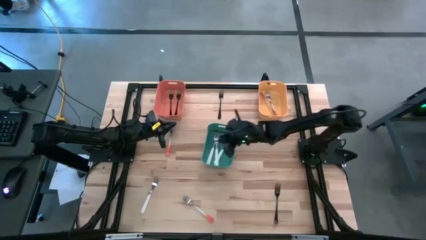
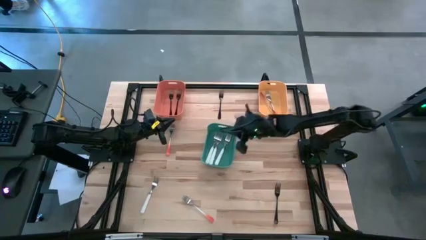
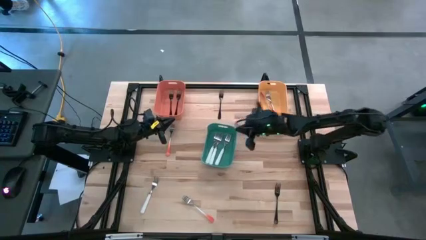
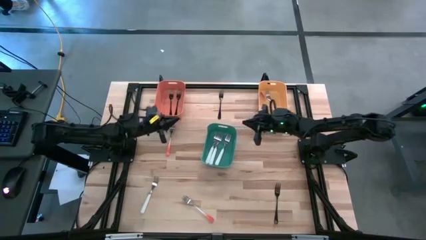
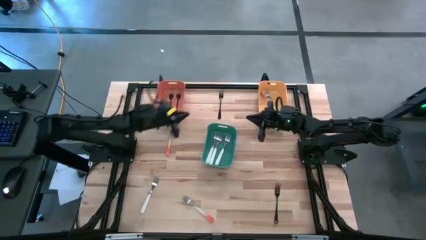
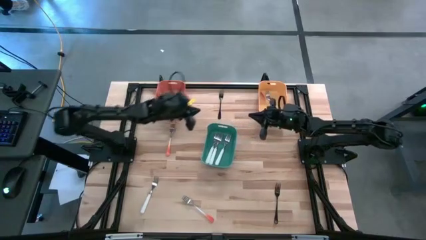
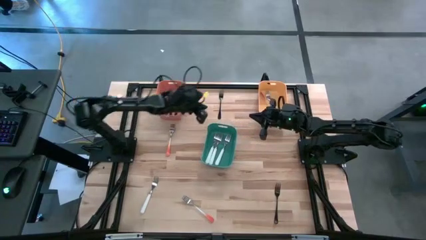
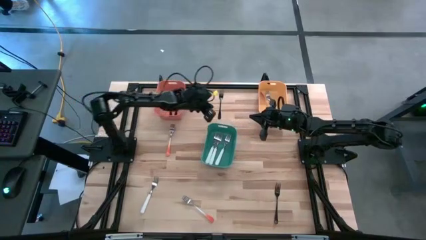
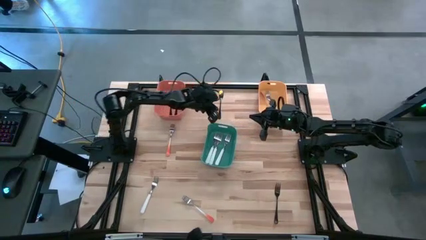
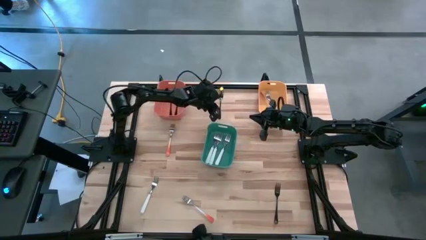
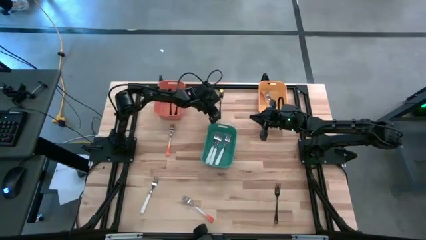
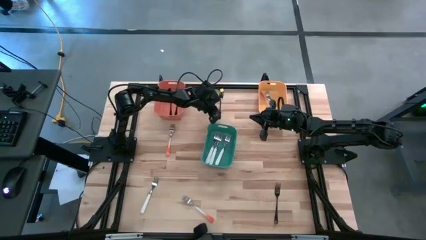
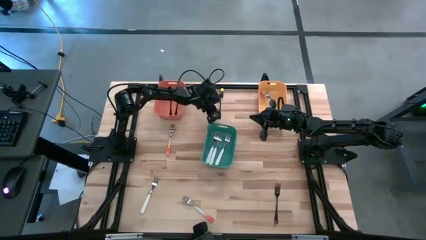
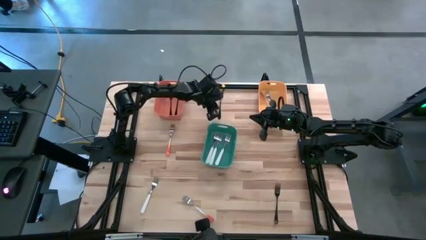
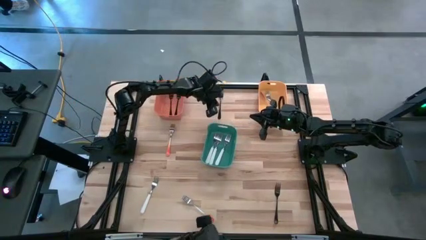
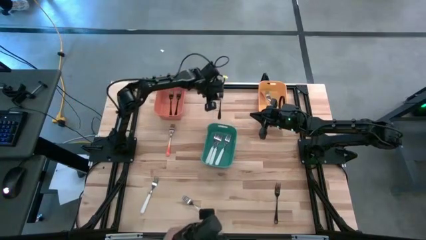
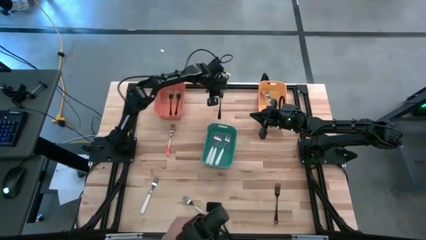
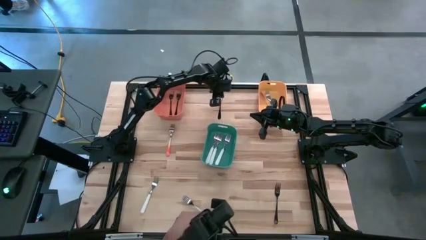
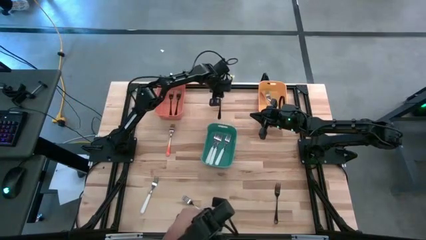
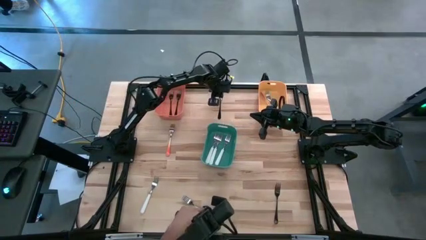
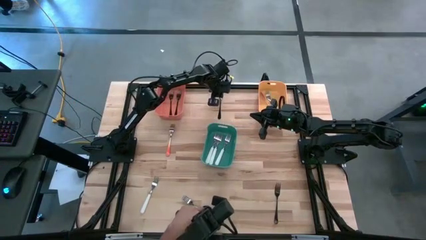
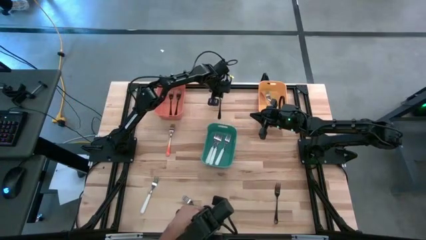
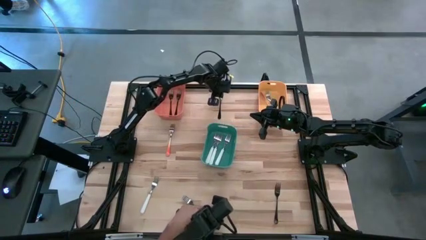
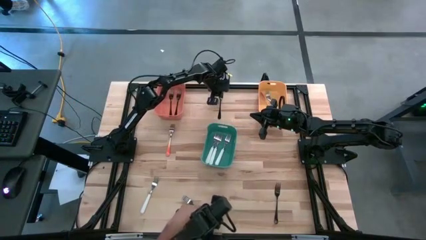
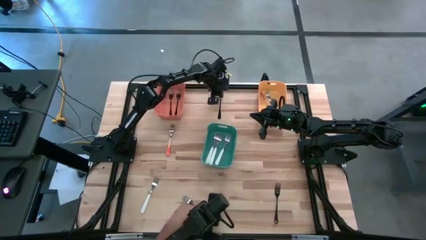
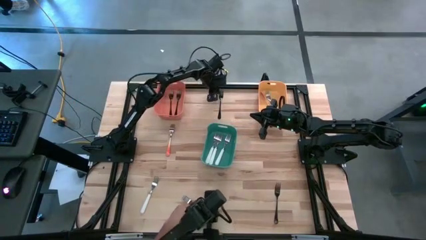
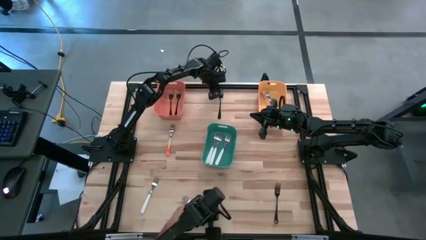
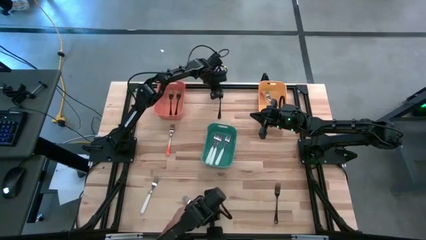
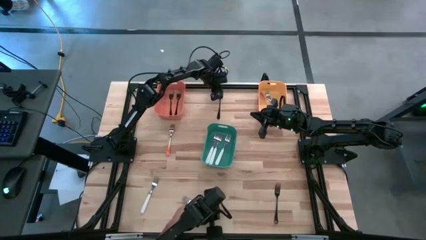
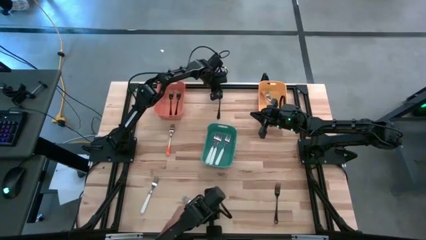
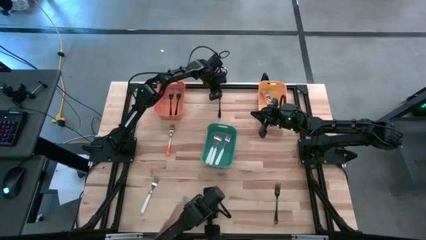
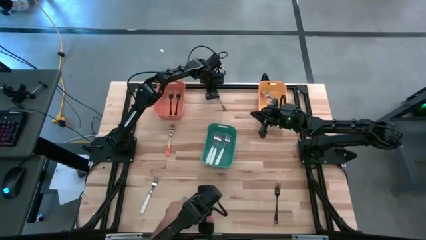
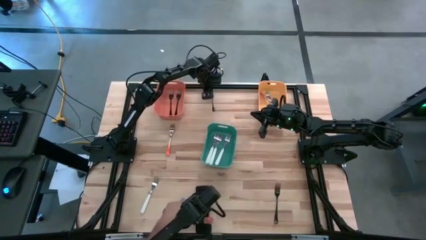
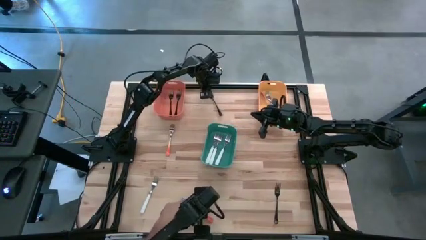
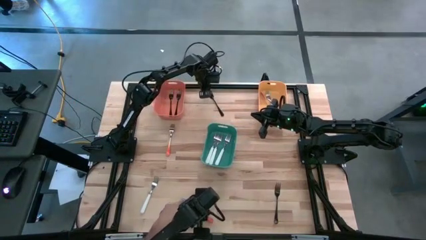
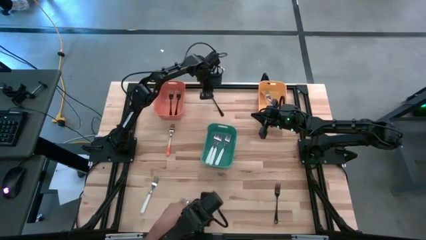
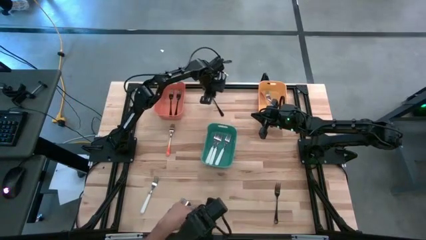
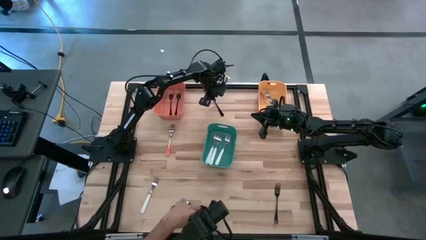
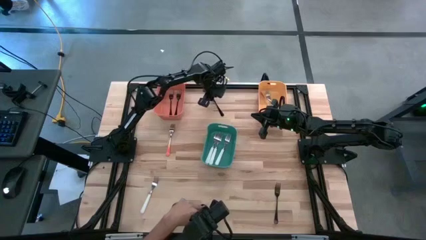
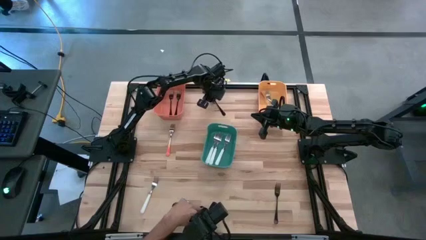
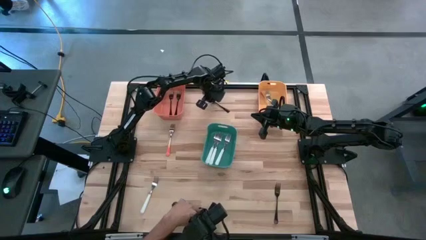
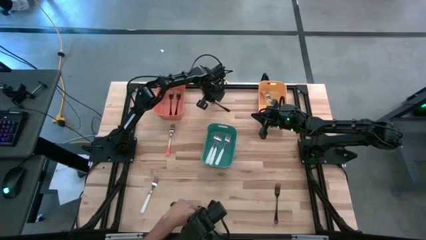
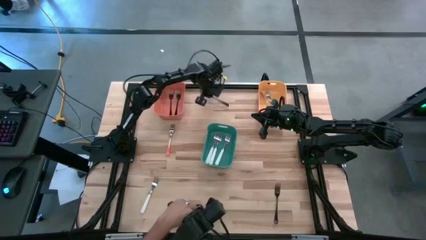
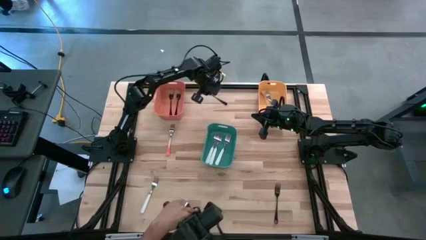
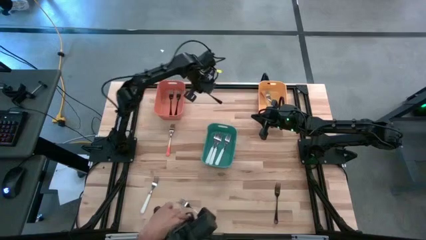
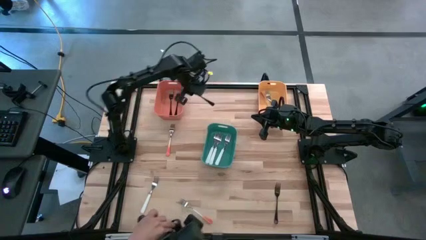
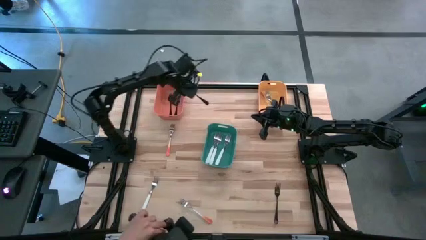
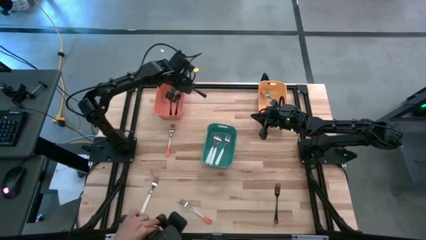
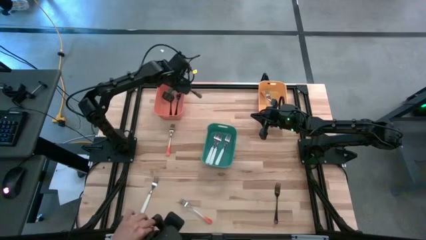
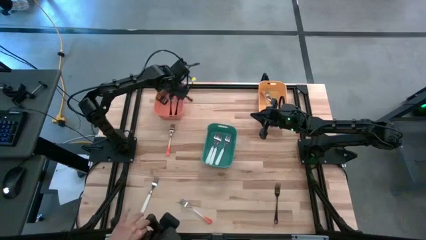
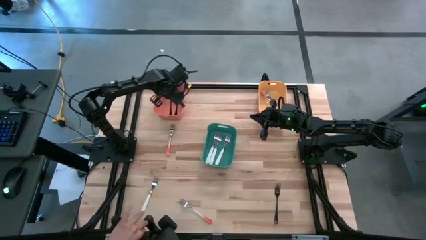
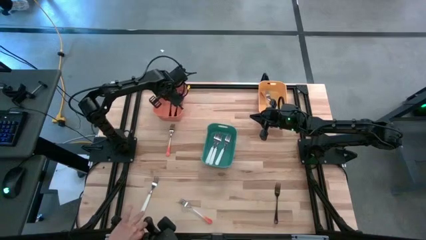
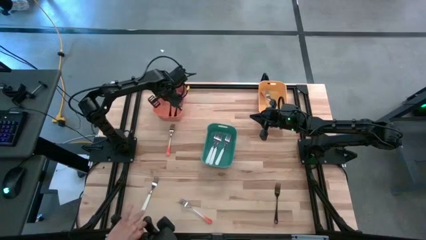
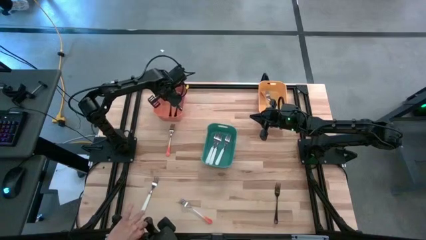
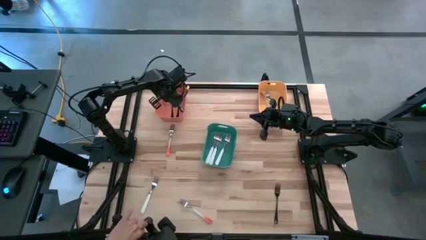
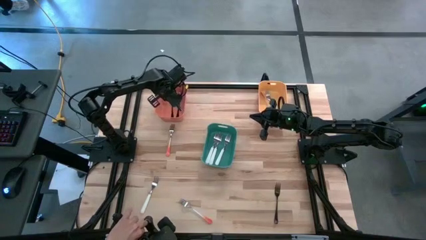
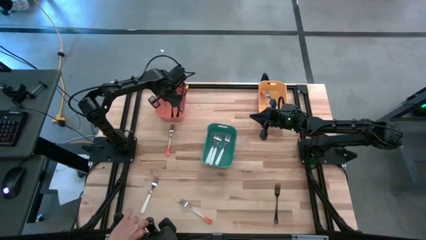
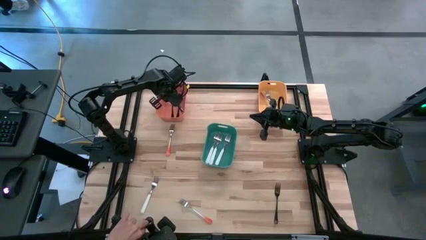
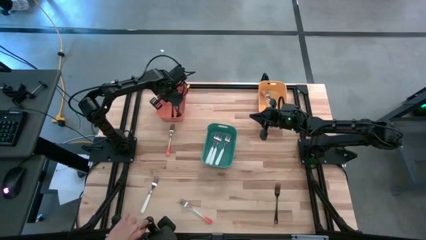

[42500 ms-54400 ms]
Task: Sort silverware by color (type)
Put the top black fork into the orange bin

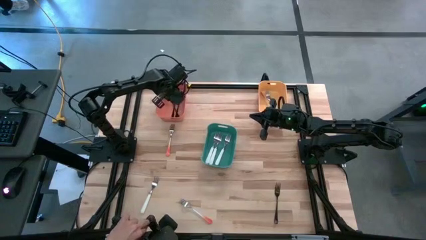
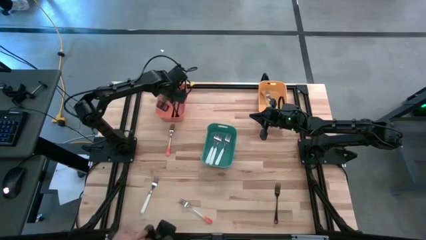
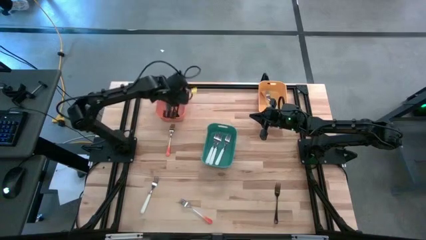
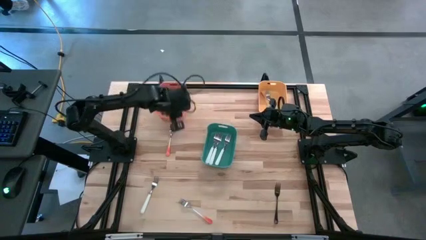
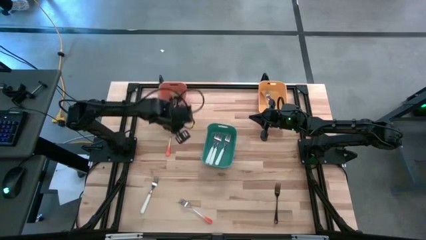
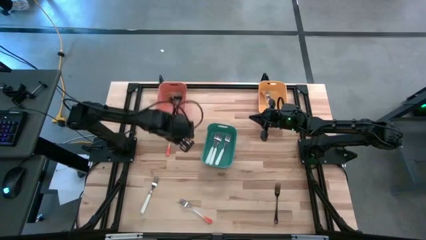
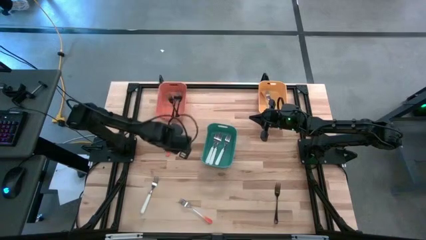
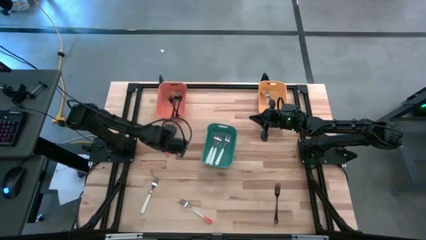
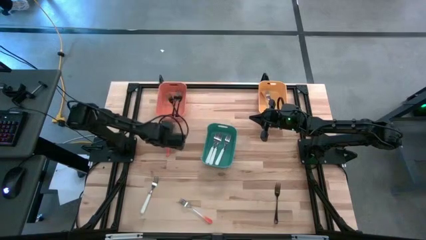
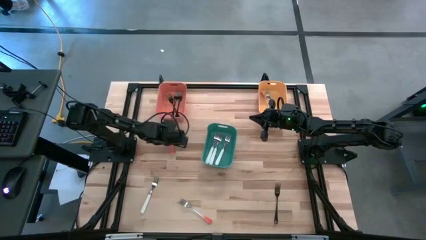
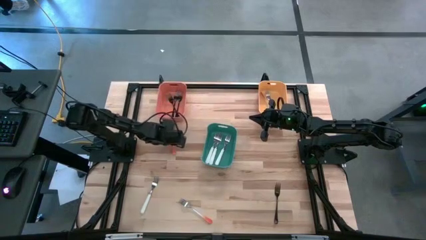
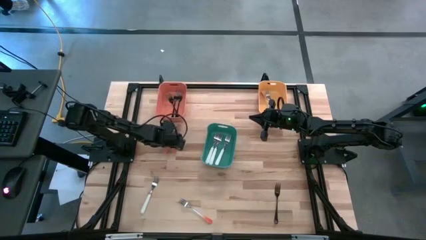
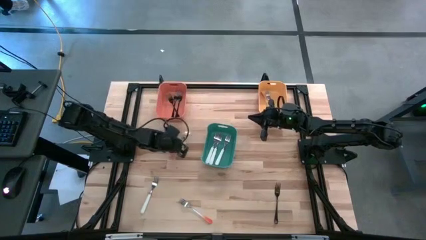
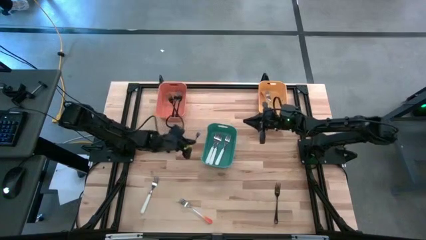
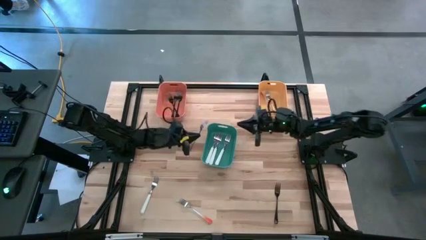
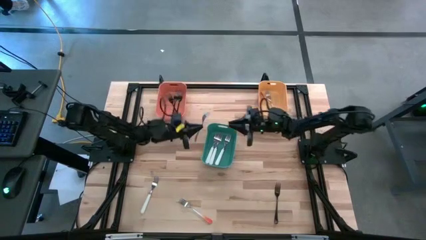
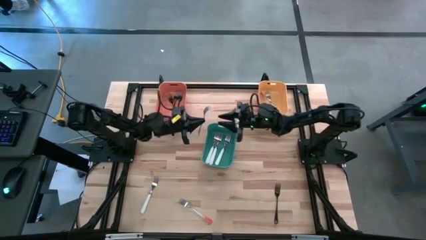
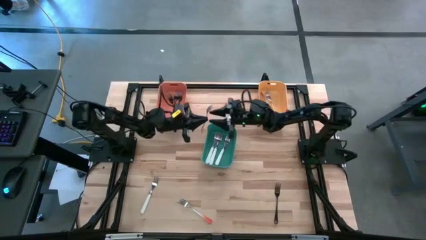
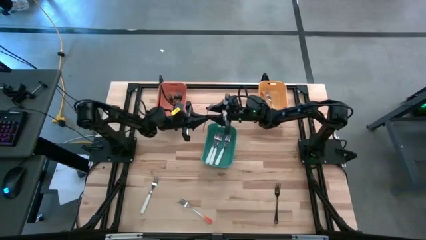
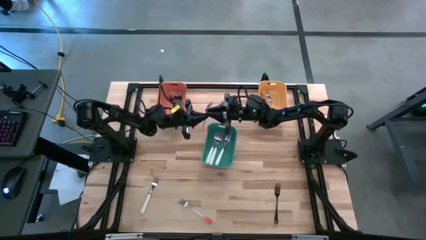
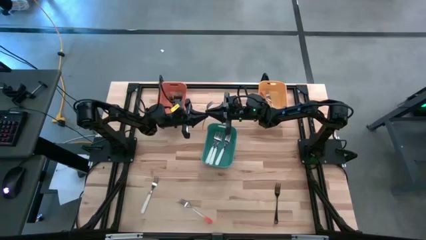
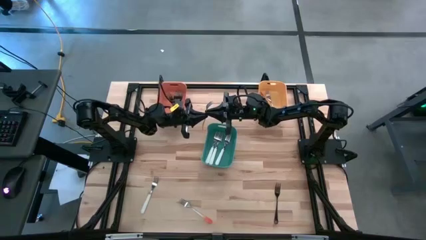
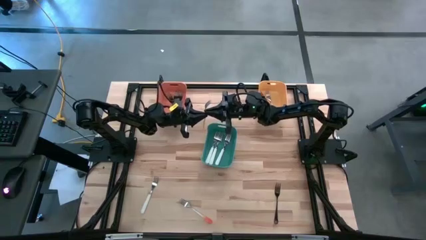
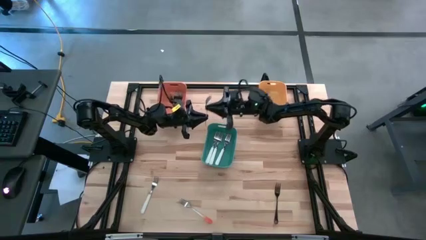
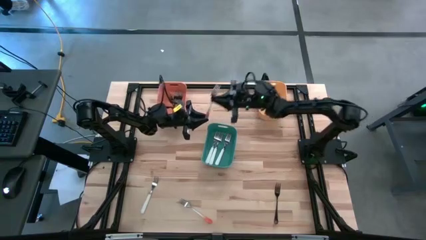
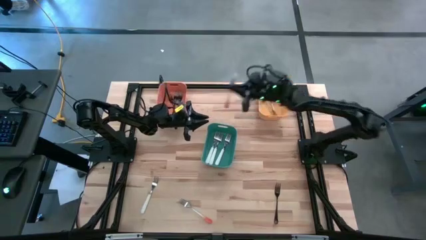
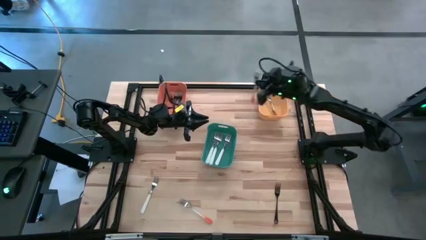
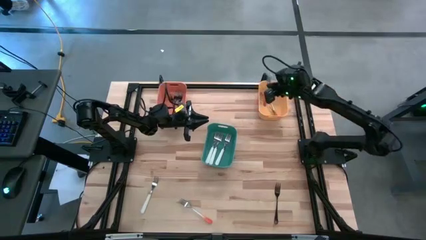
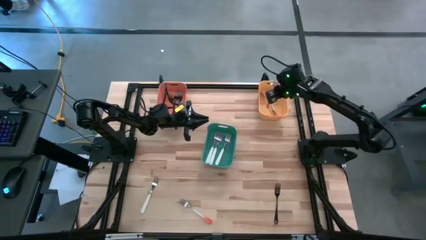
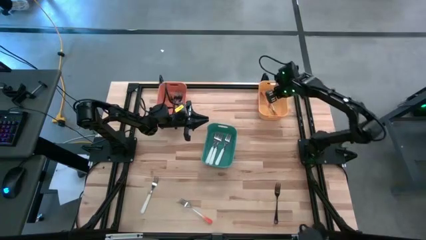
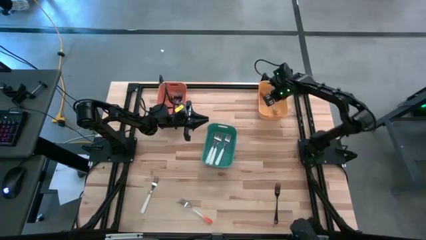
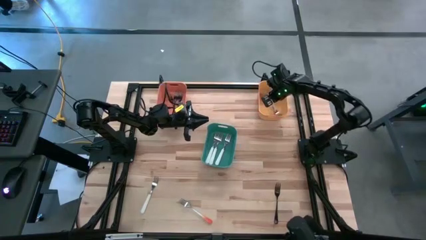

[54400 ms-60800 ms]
Put the top orange fork into the yellow bin
